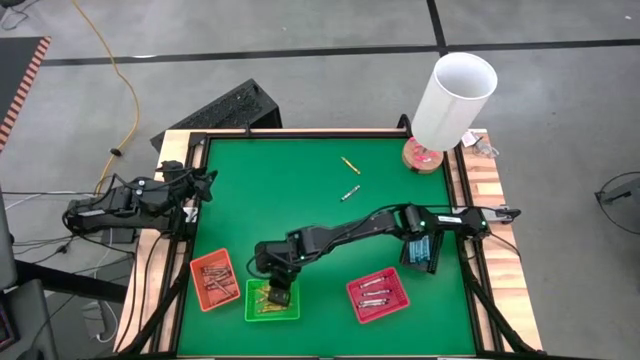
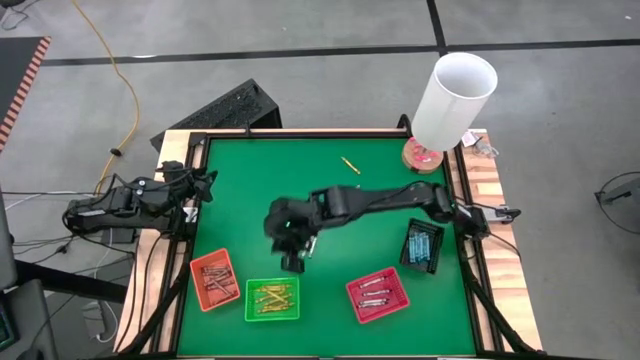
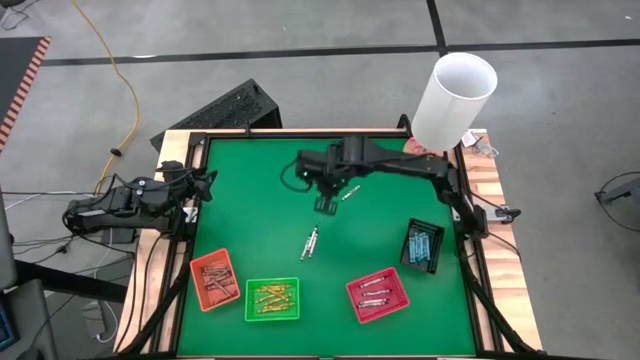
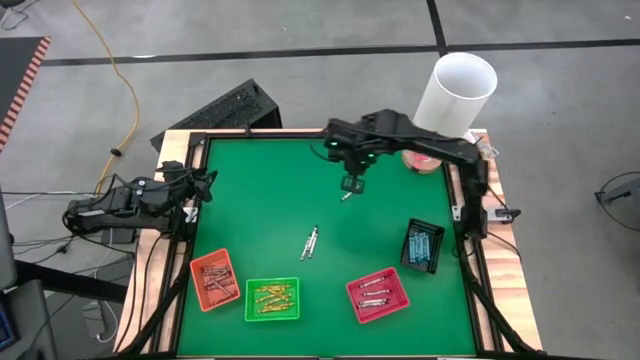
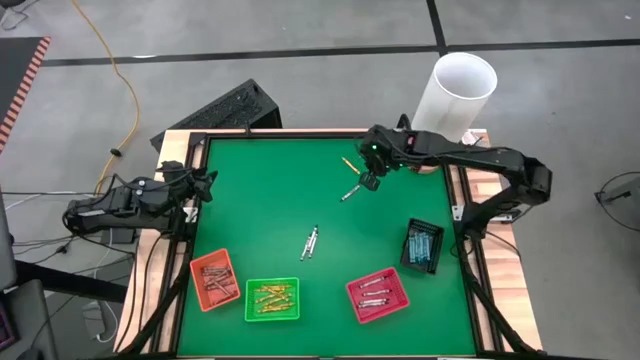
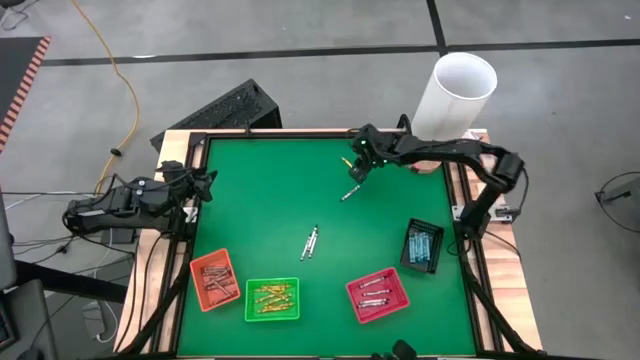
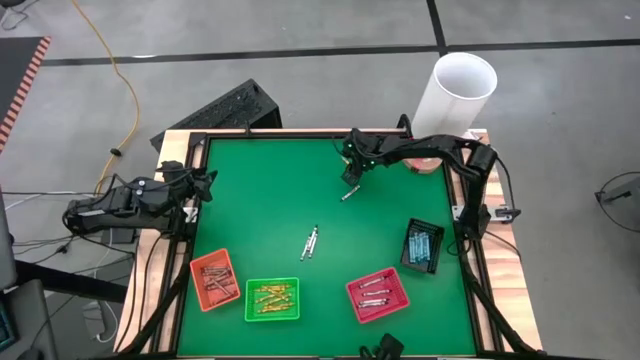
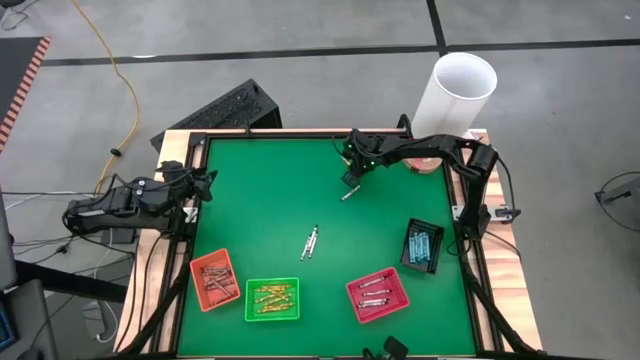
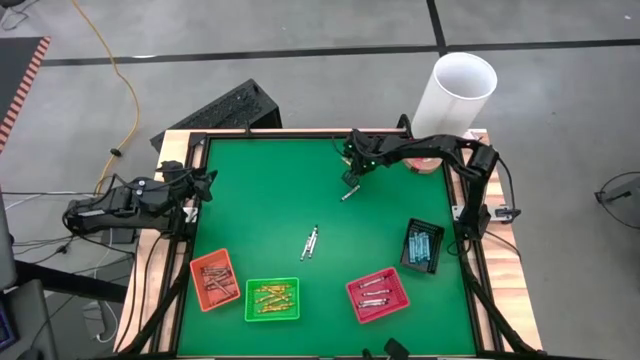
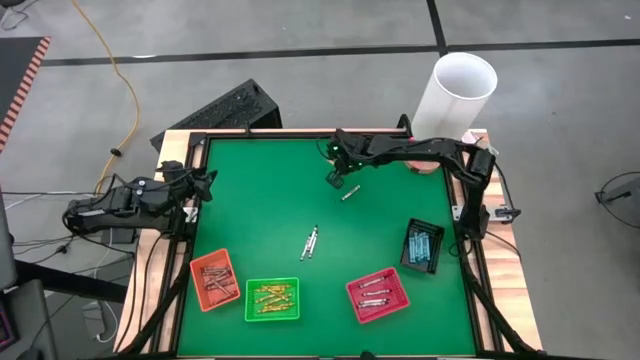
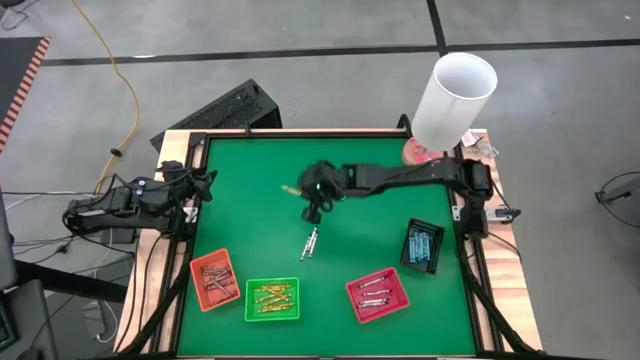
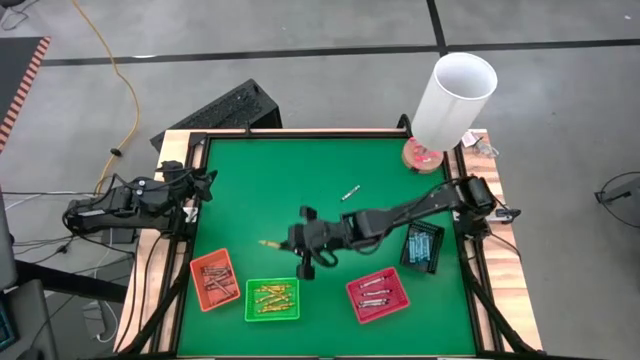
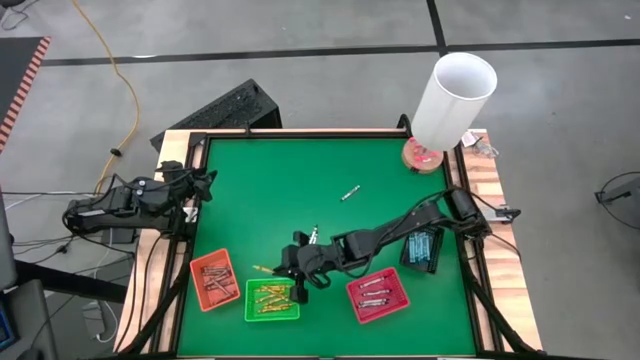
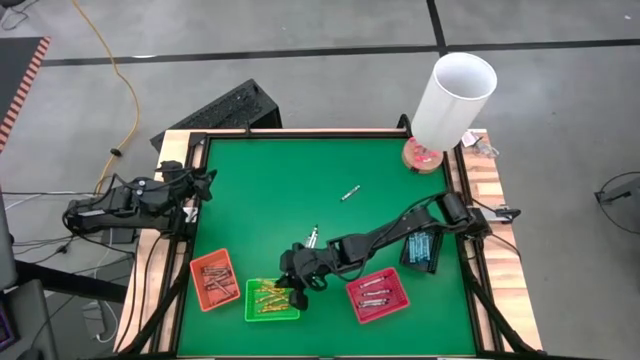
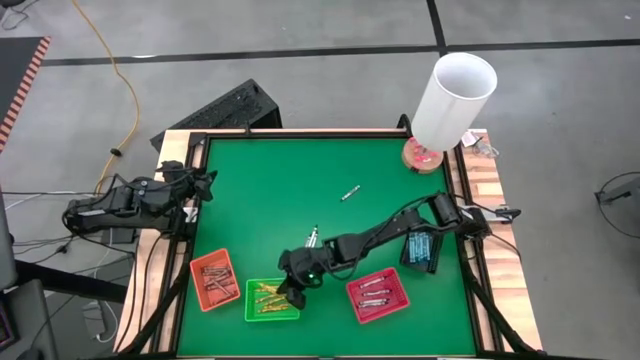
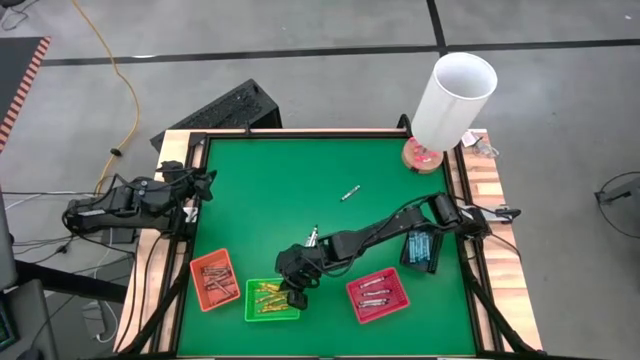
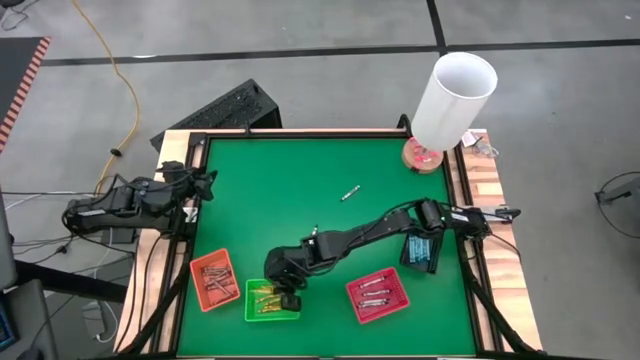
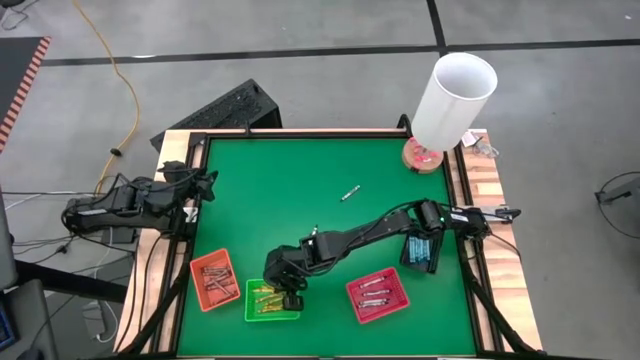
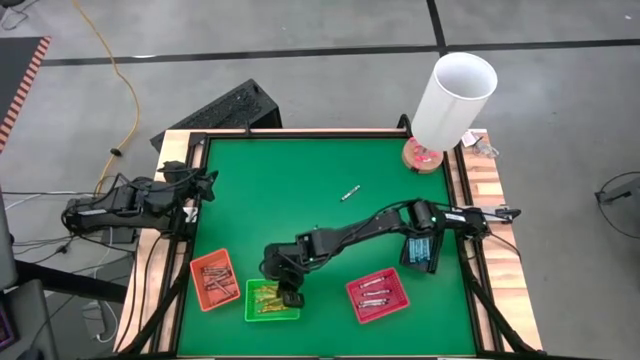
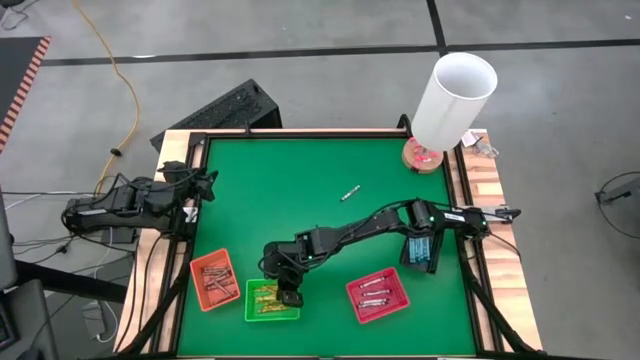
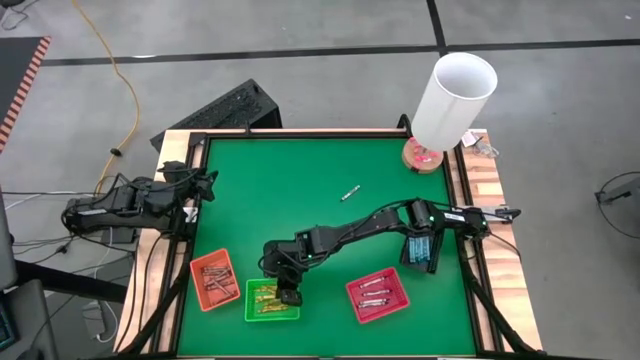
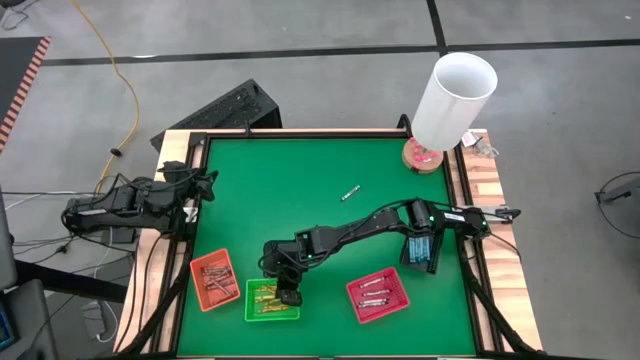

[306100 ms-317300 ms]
Task: Sort crayons
Put the yellow crayon into the green bin

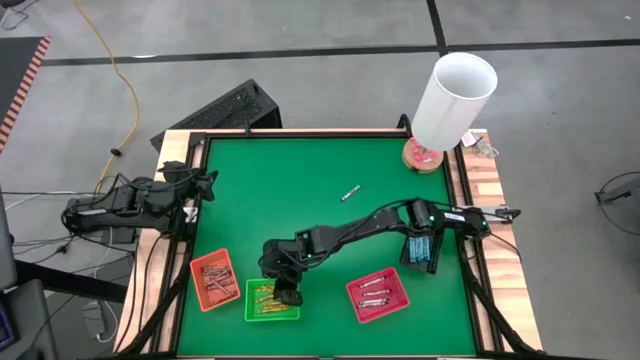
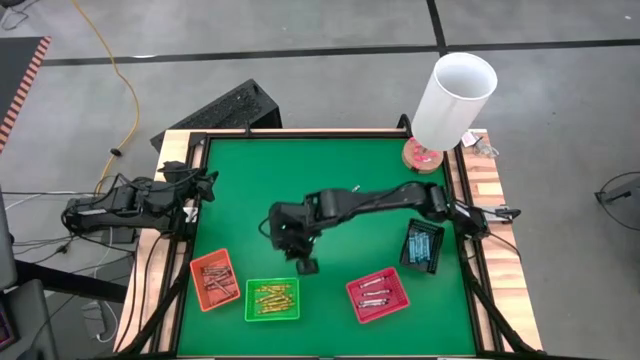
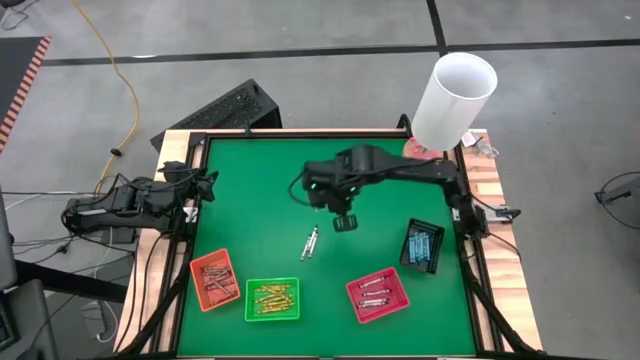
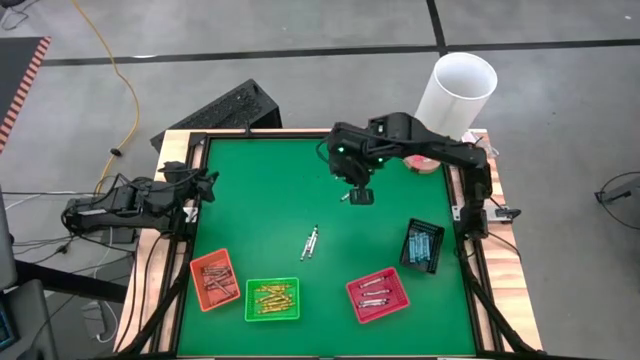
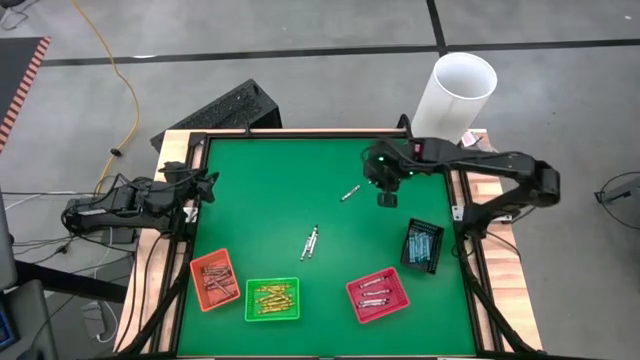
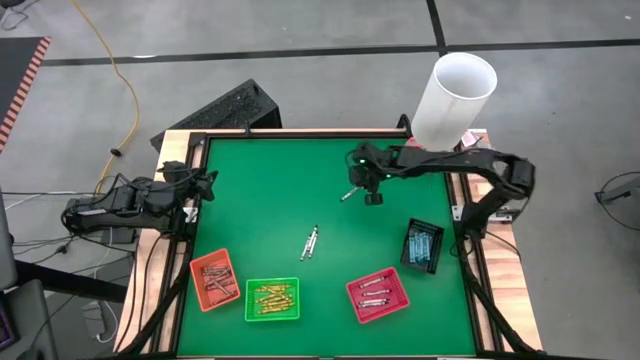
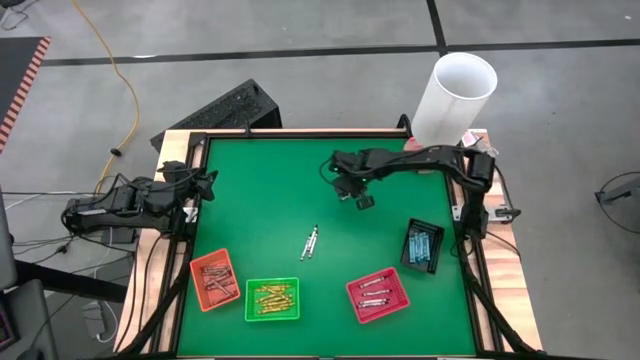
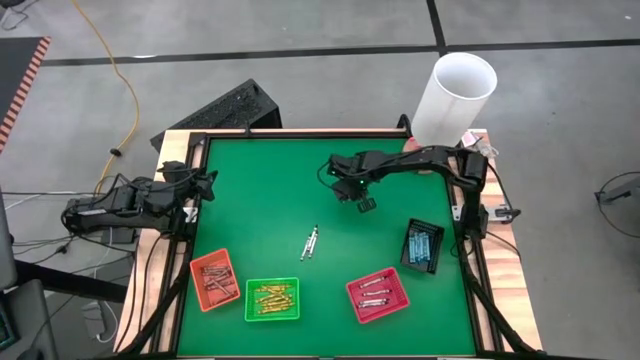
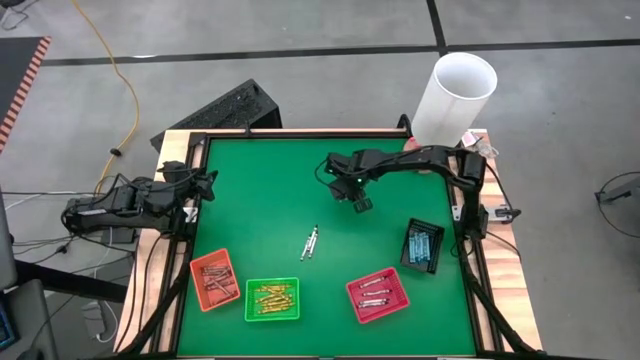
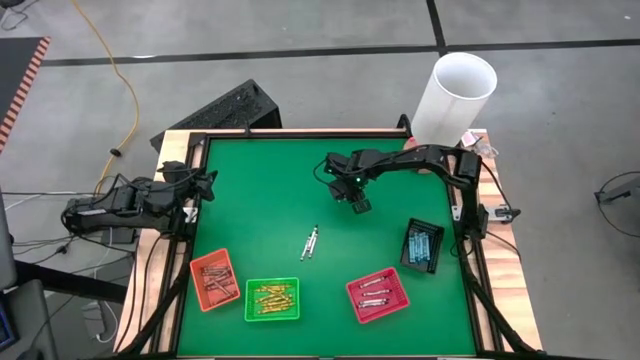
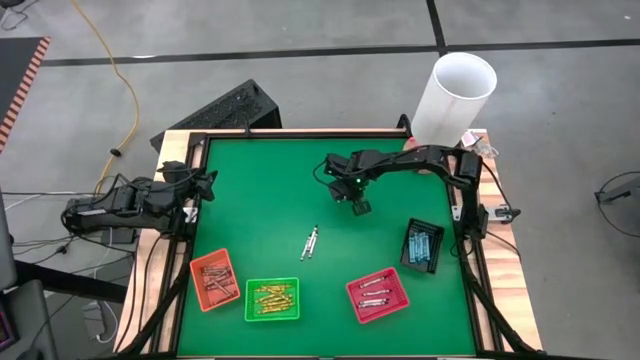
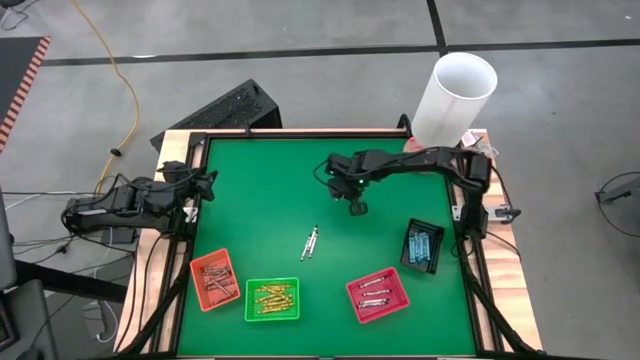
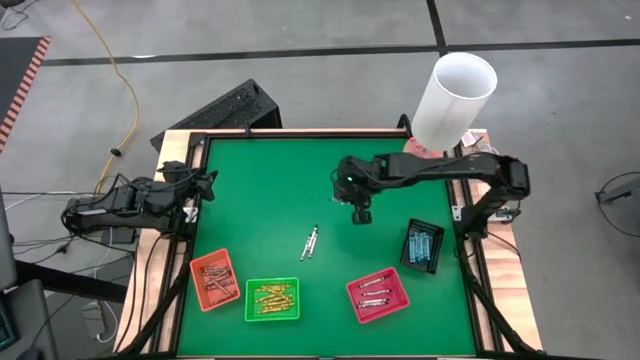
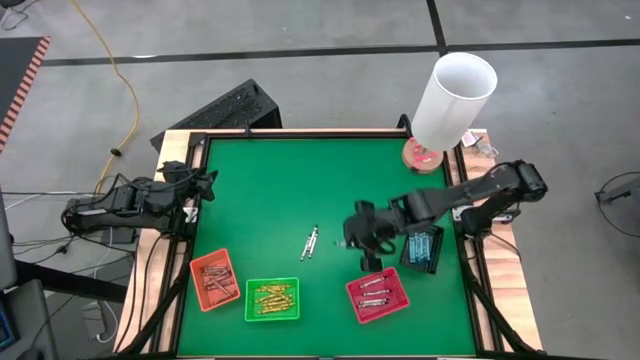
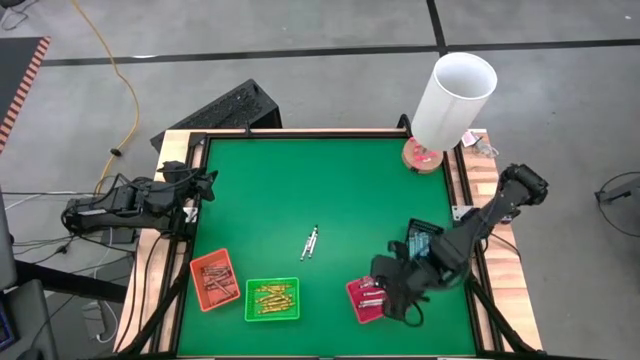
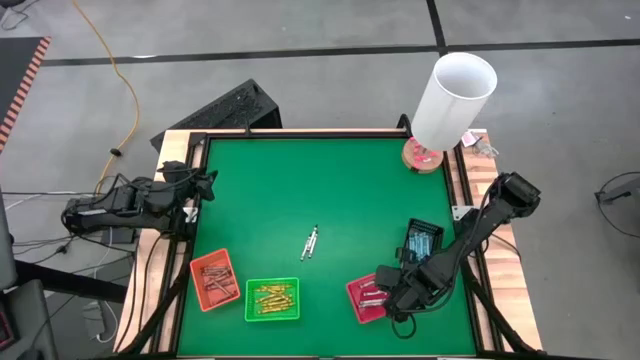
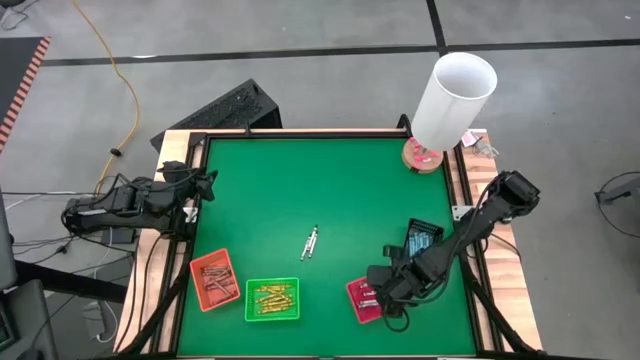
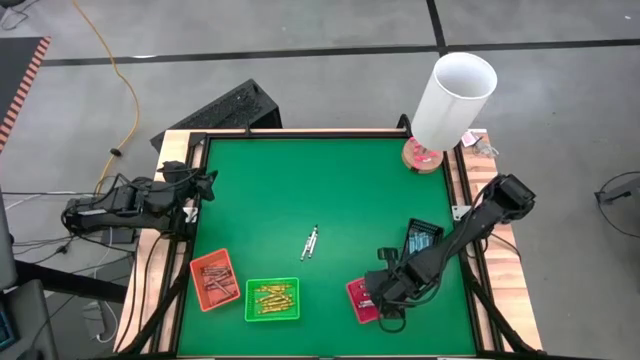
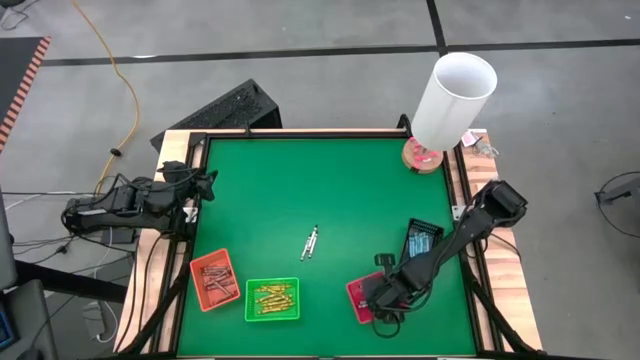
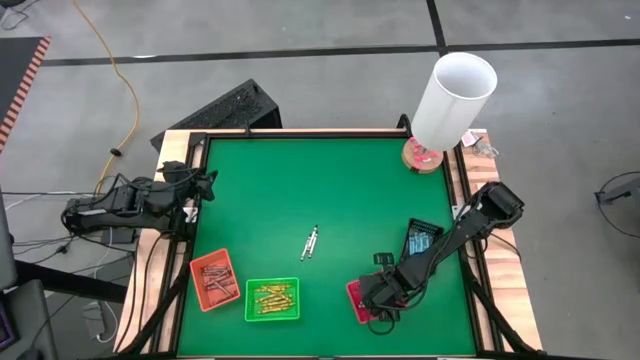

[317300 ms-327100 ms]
Put the black crayon into the red bin
